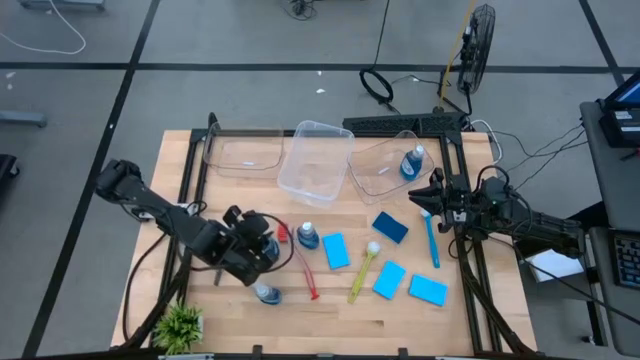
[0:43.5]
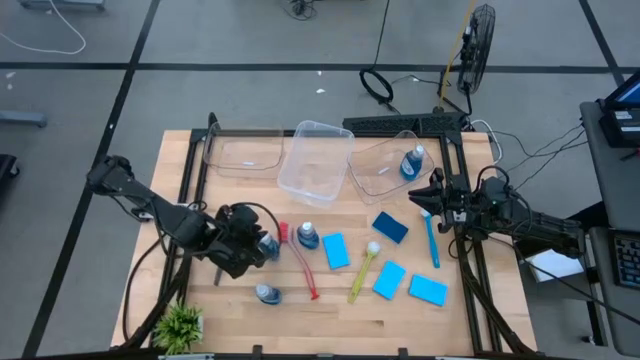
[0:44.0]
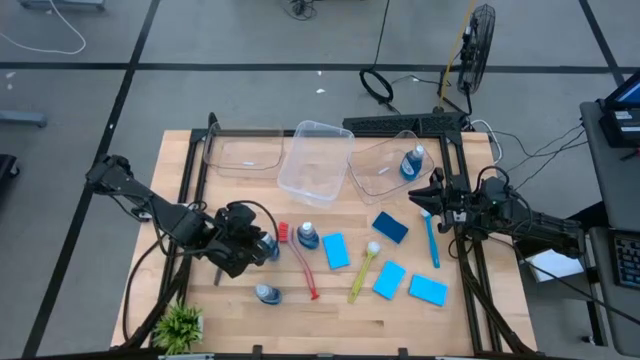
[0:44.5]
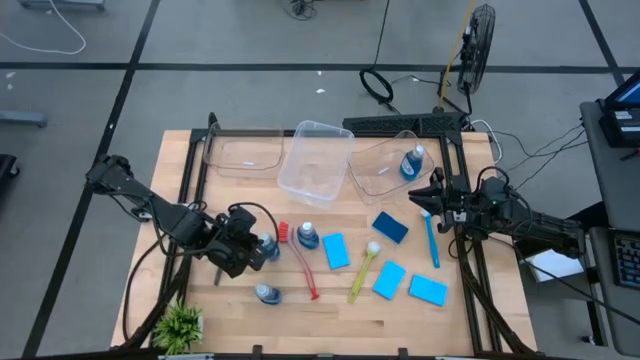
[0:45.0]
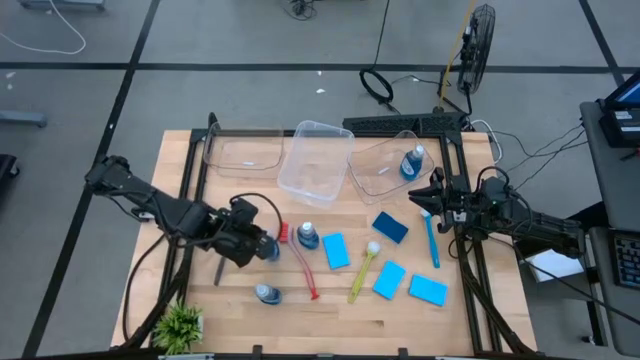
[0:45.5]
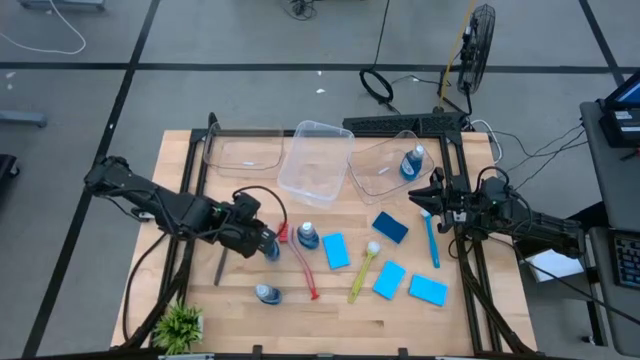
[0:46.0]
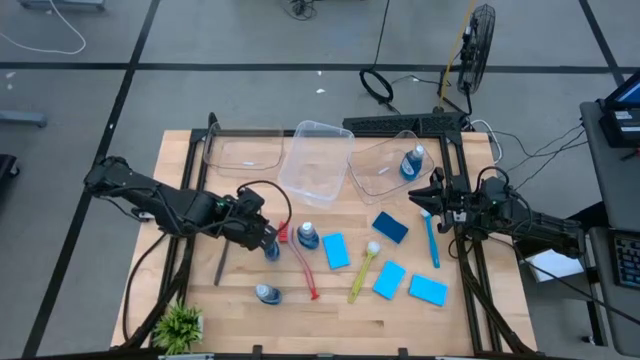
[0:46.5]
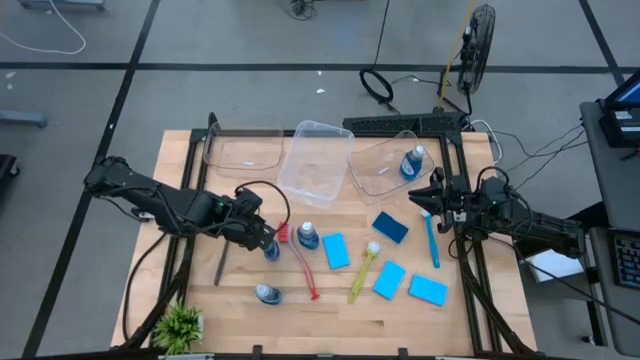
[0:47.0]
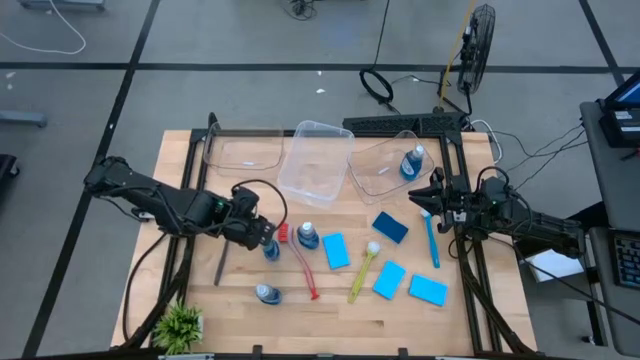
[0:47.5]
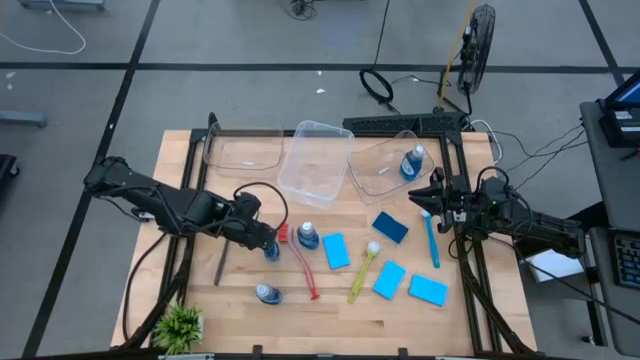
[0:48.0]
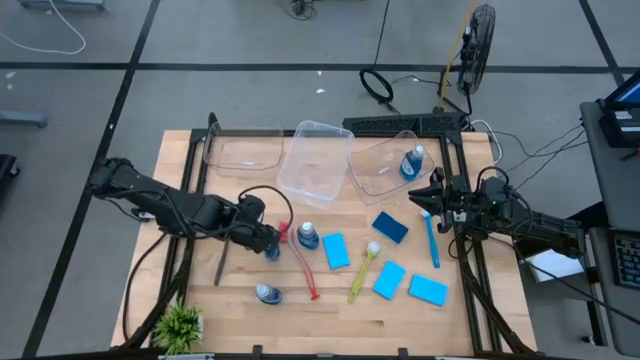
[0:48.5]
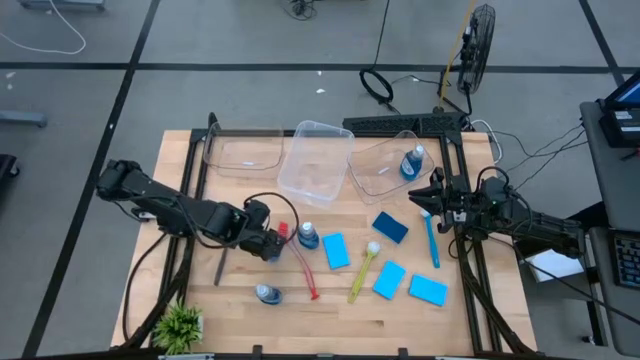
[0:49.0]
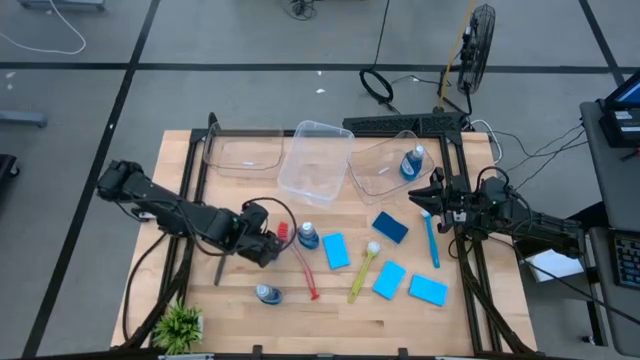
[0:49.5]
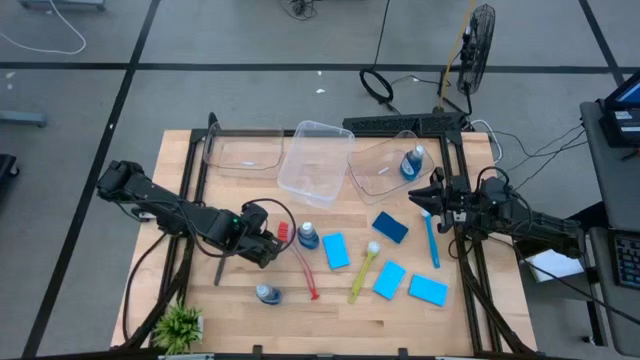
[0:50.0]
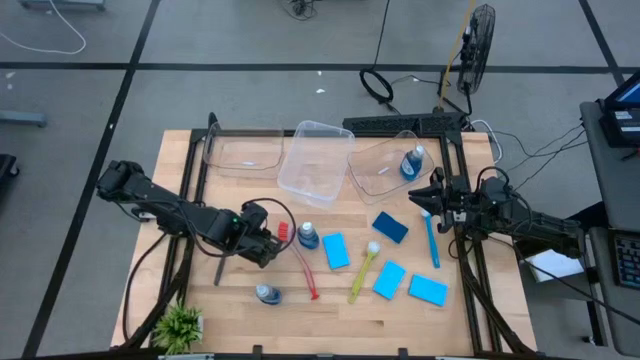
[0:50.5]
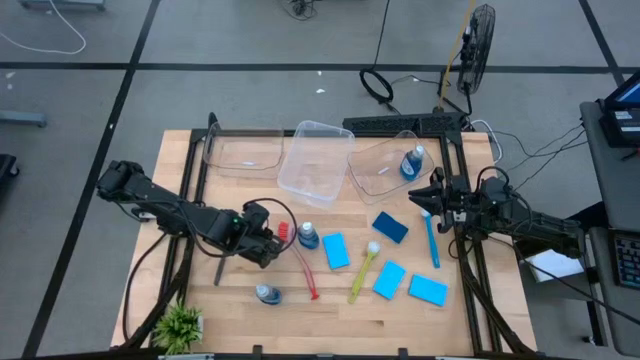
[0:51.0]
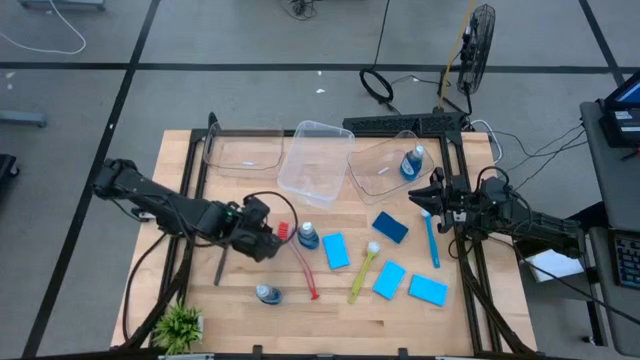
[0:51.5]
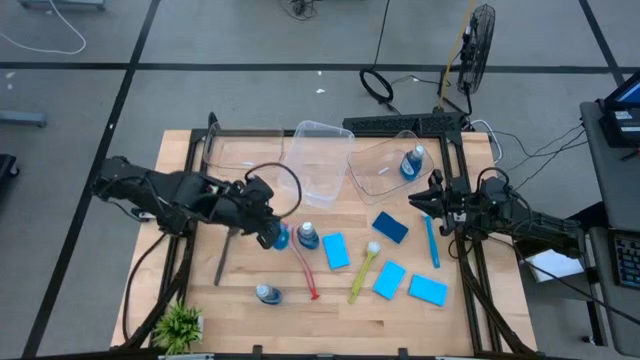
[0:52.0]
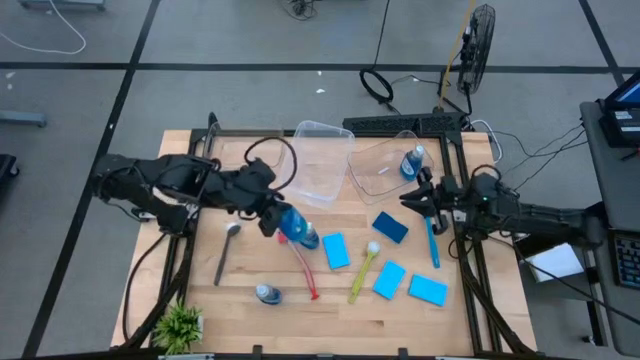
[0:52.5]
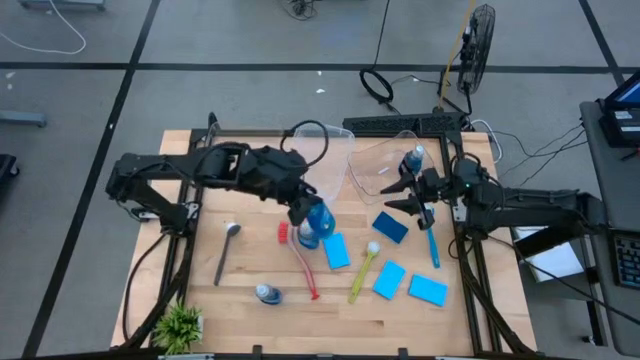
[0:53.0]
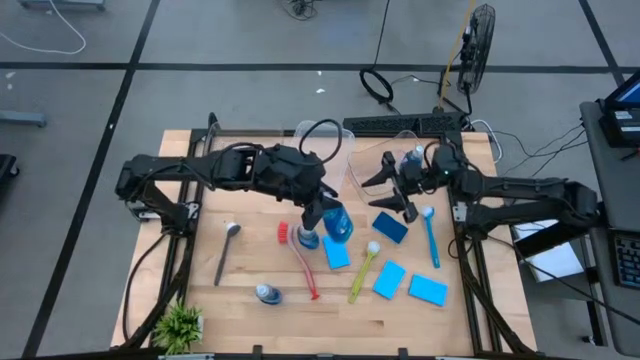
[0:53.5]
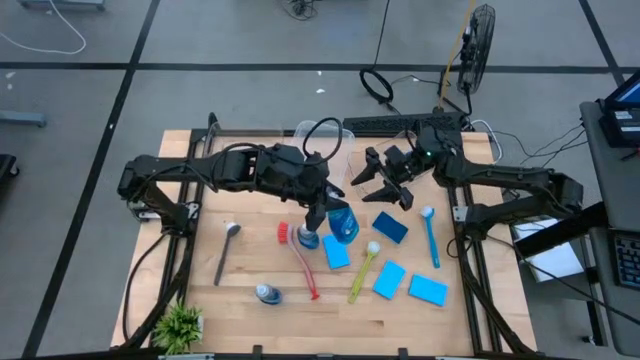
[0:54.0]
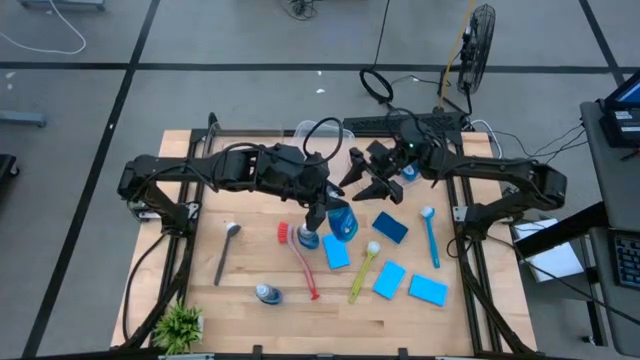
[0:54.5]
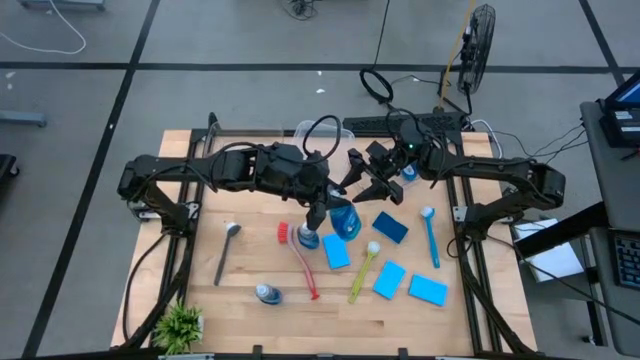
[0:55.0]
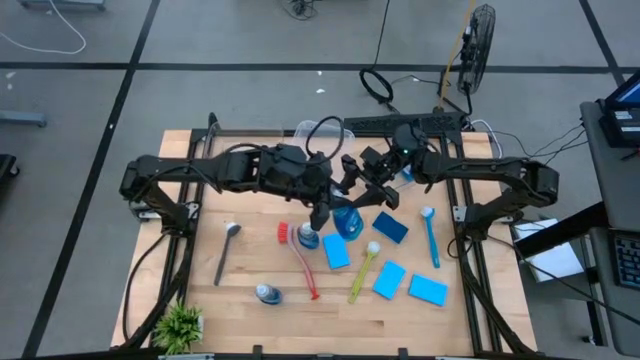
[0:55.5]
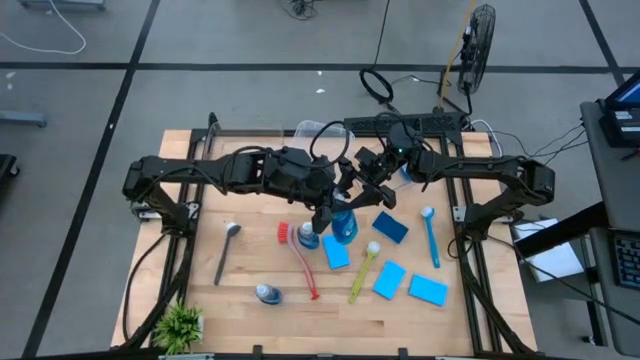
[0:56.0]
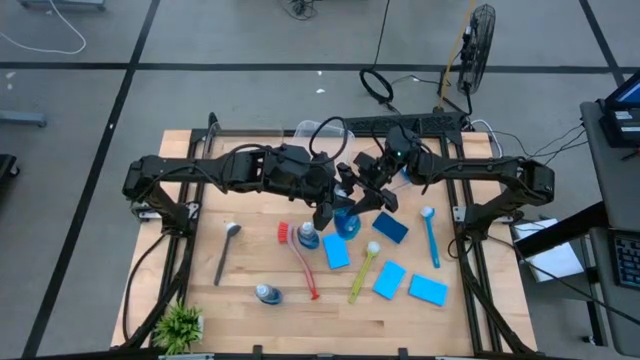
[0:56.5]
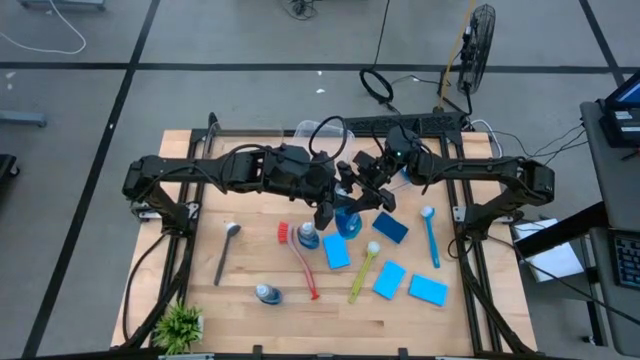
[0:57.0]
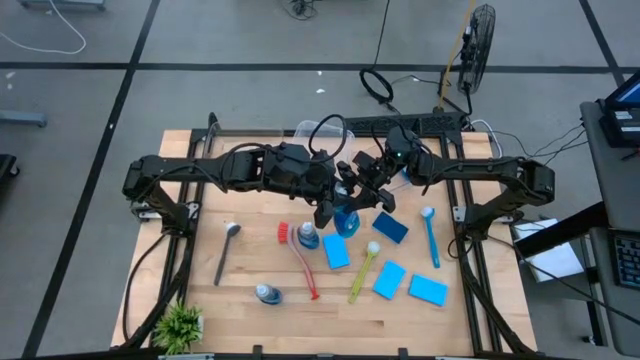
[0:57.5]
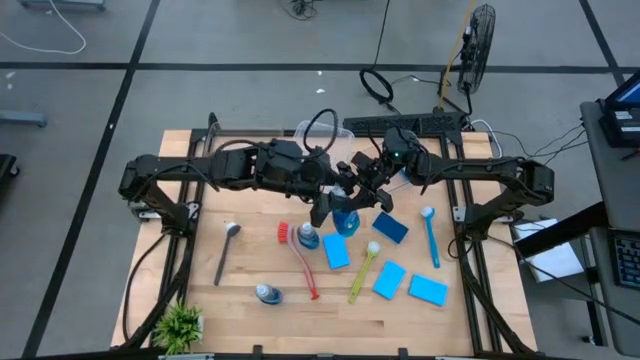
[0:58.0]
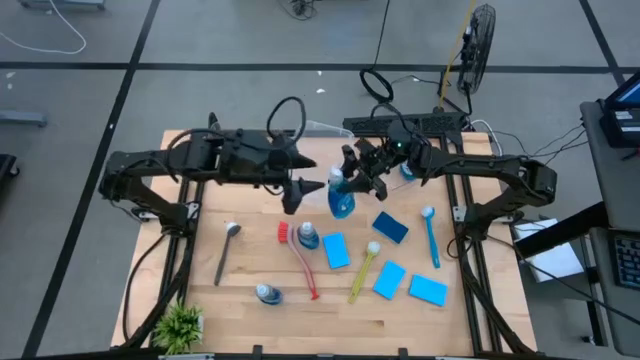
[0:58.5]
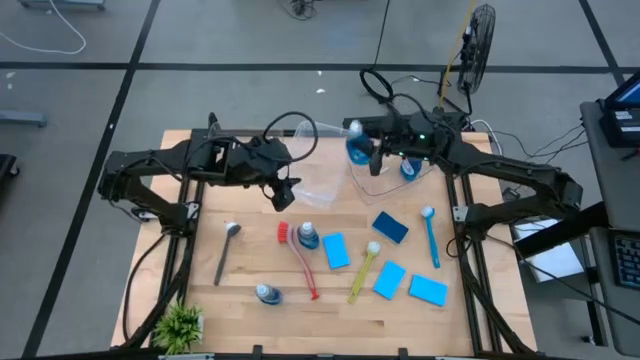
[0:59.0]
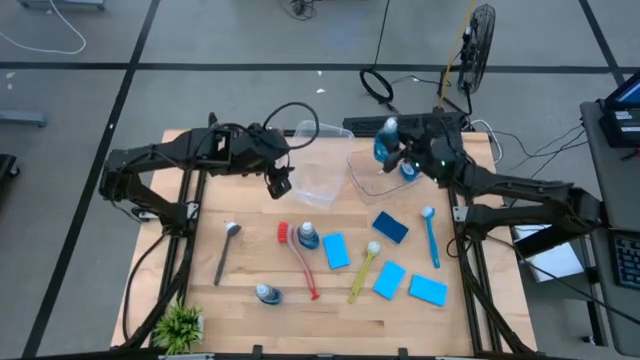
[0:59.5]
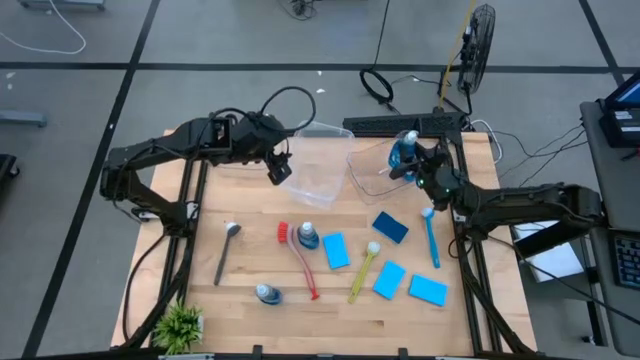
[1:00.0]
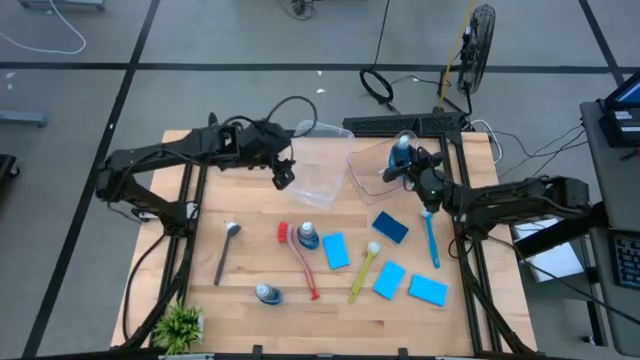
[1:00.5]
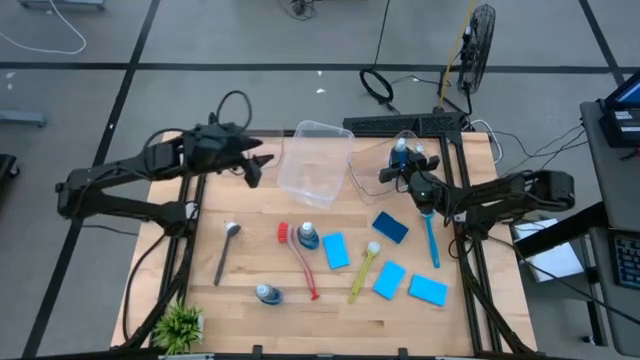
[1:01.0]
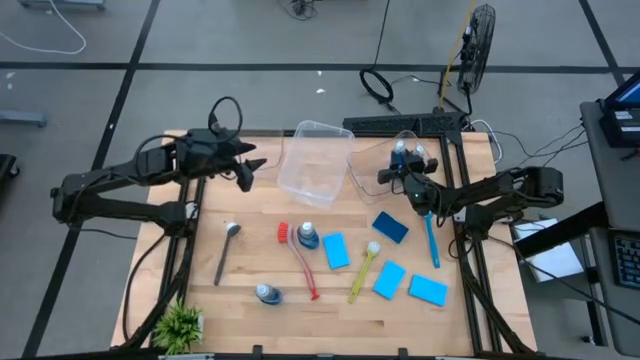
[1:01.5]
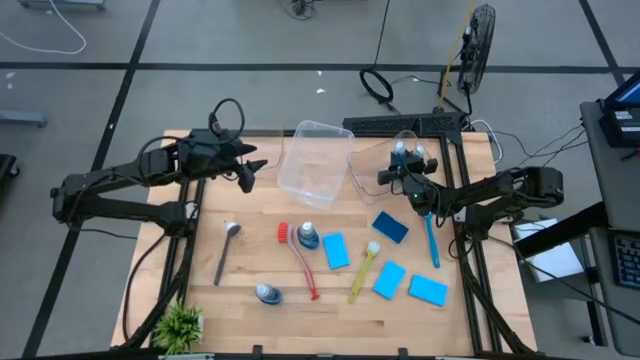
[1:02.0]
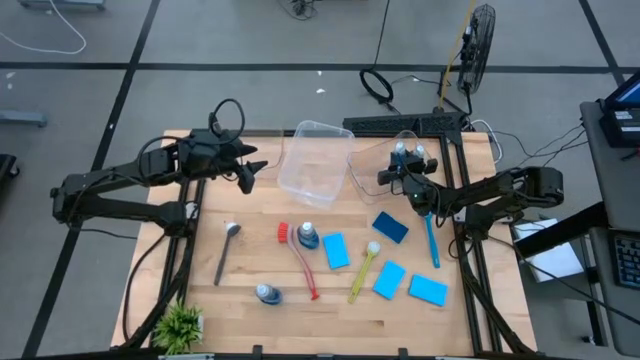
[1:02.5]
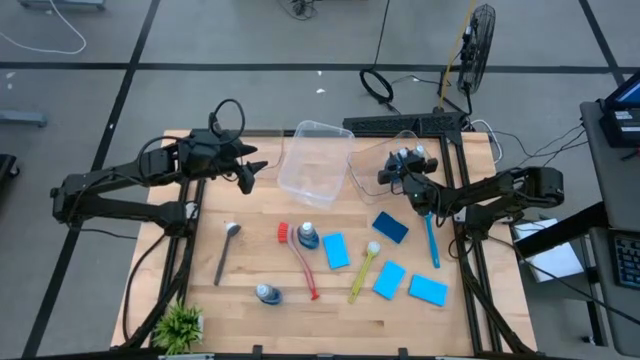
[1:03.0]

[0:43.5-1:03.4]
Task: Pick & Place Kitchen Sink Supplies
Put the blue dish soap into the right transparent bin

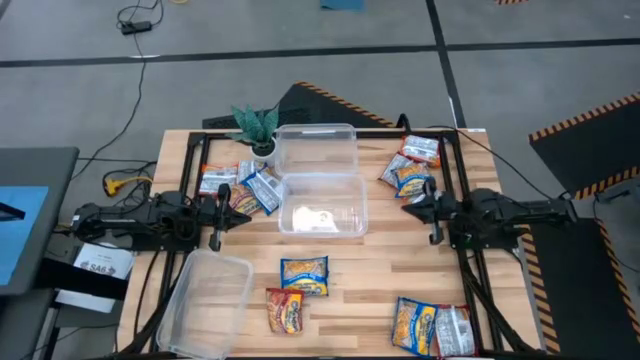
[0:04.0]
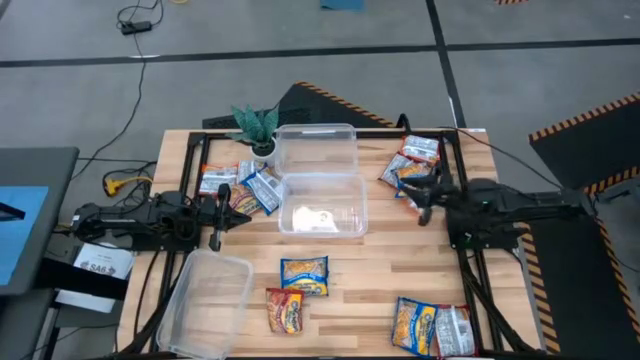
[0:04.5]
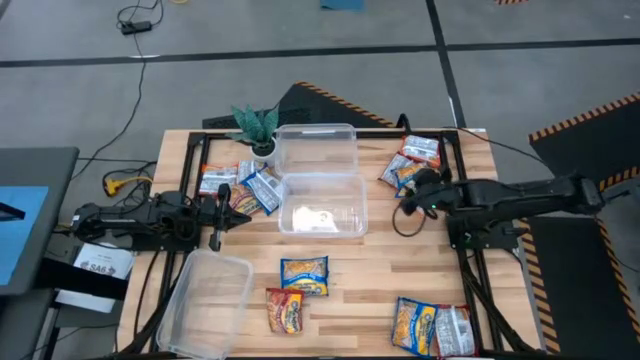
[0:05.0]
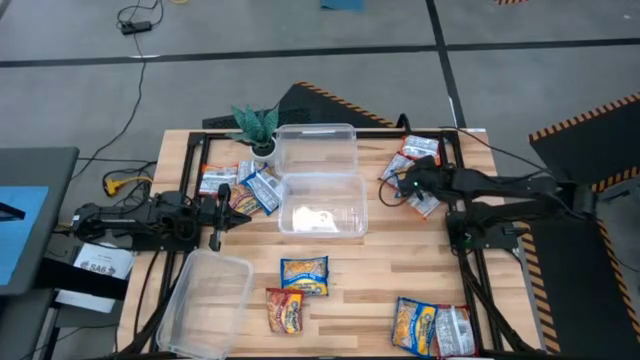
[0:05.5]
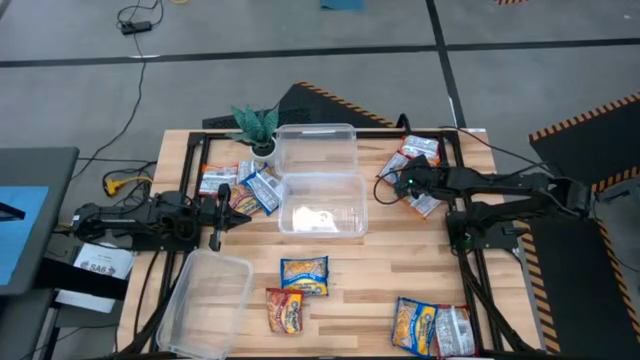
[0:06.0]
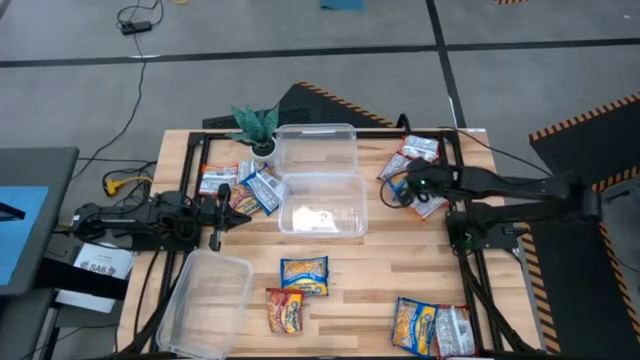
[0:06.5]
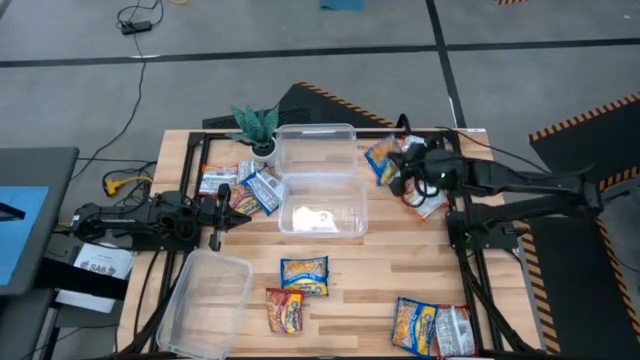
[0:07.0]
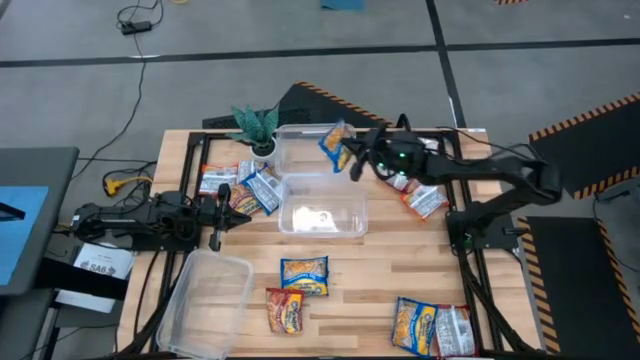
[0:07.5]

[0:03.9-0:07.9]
Task: Sort Maruchan noodles
Put the blue noodle pack into the top transparent bin
